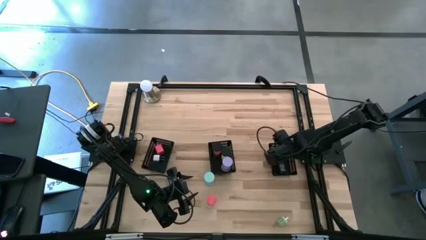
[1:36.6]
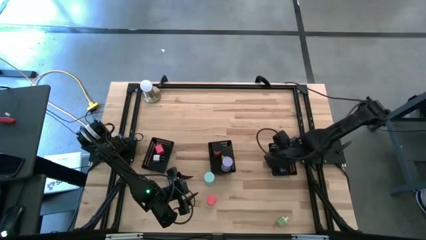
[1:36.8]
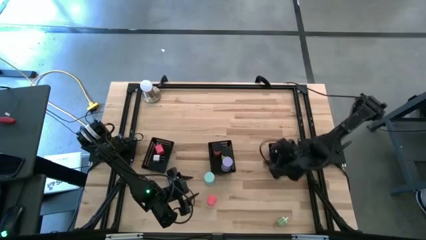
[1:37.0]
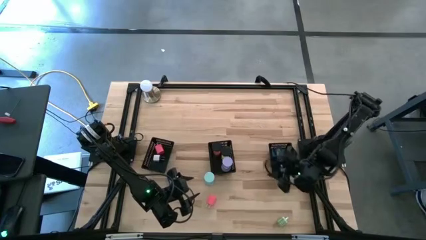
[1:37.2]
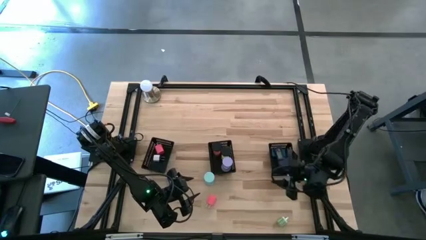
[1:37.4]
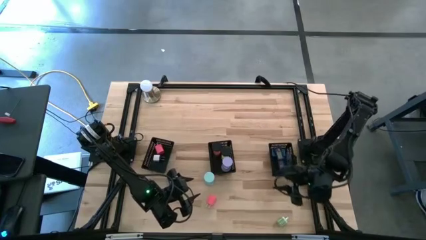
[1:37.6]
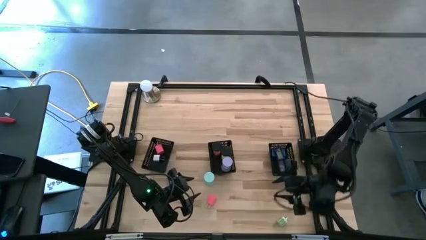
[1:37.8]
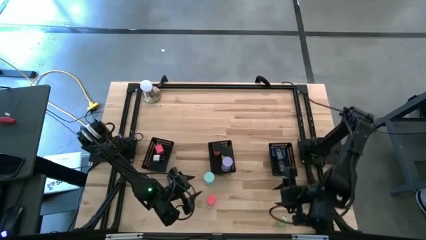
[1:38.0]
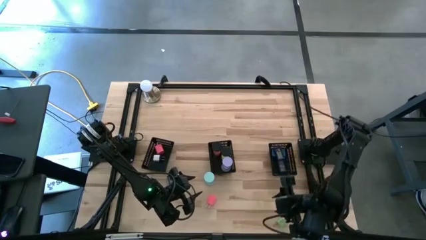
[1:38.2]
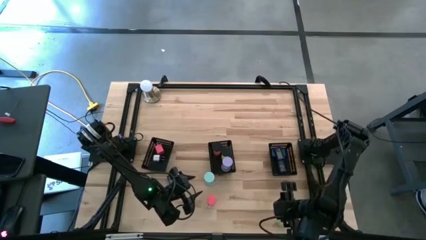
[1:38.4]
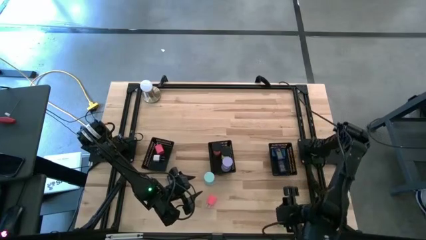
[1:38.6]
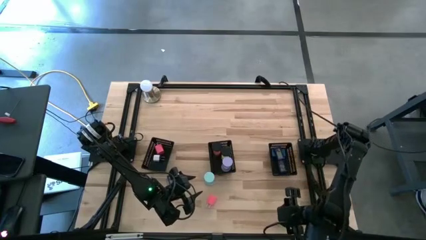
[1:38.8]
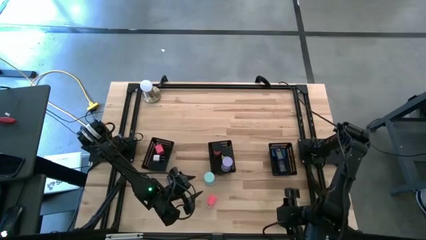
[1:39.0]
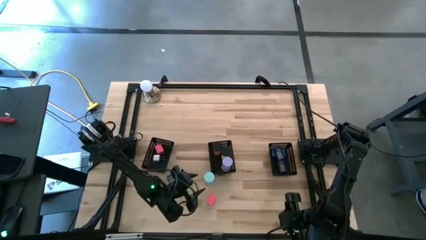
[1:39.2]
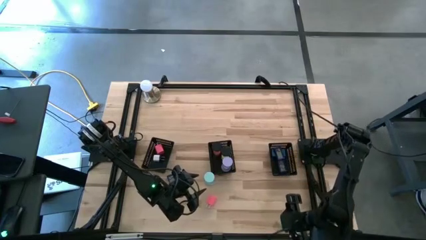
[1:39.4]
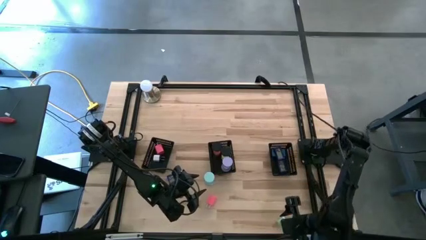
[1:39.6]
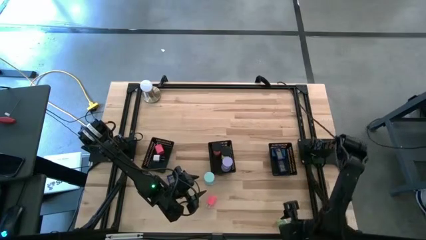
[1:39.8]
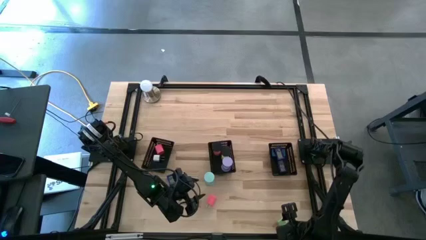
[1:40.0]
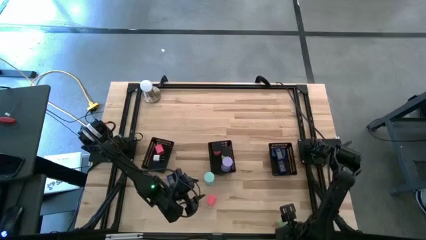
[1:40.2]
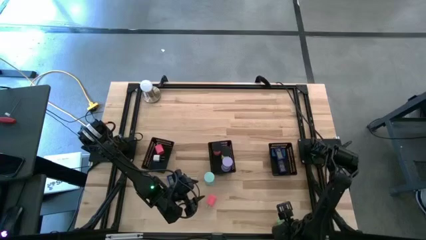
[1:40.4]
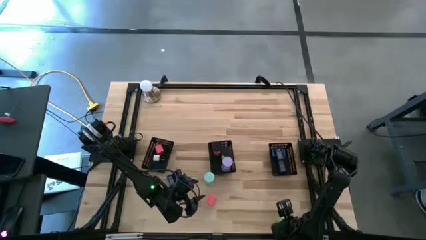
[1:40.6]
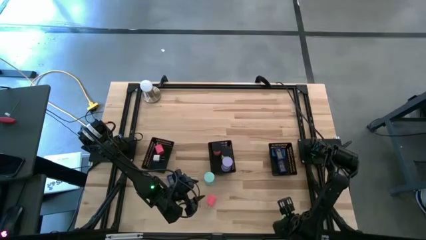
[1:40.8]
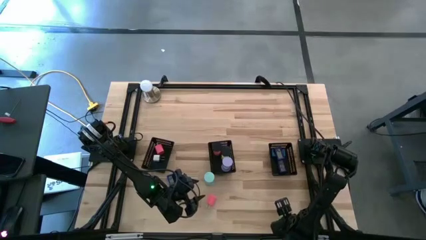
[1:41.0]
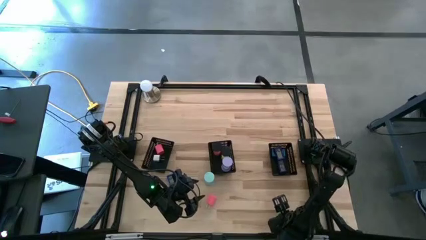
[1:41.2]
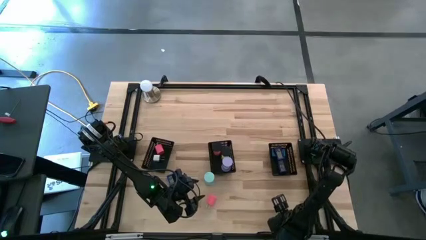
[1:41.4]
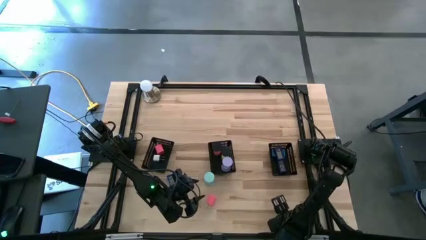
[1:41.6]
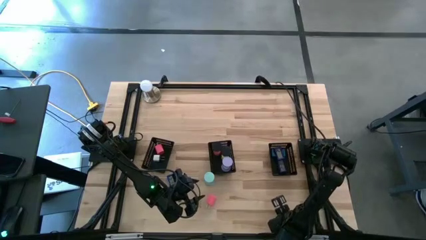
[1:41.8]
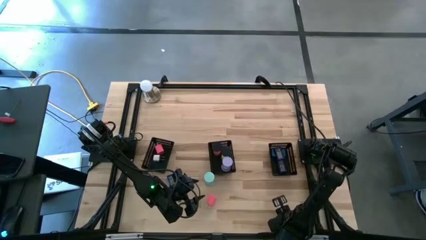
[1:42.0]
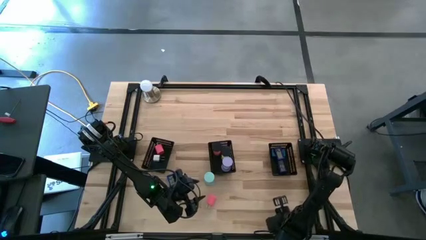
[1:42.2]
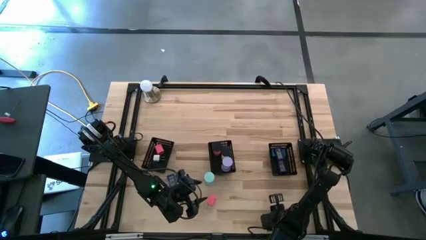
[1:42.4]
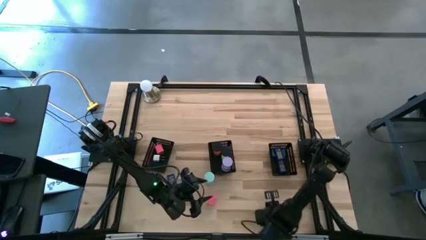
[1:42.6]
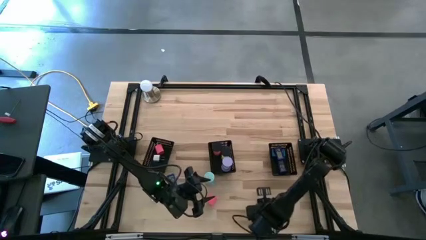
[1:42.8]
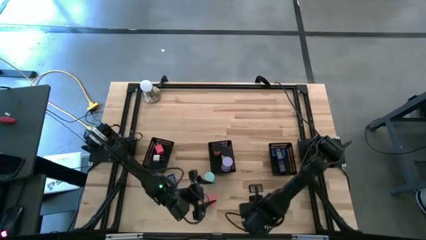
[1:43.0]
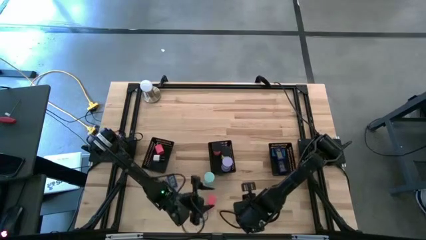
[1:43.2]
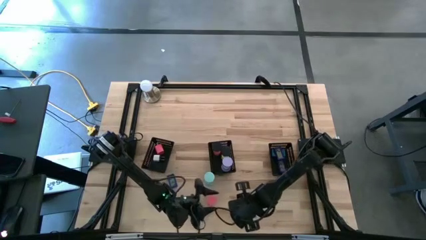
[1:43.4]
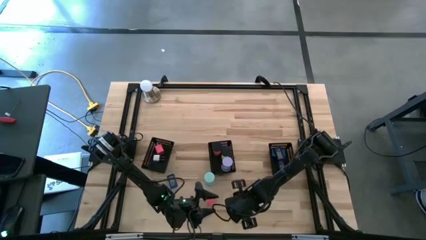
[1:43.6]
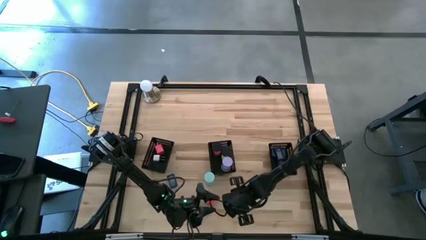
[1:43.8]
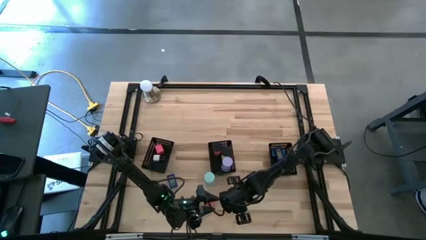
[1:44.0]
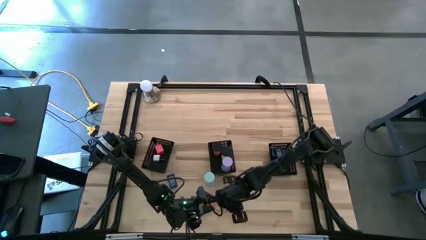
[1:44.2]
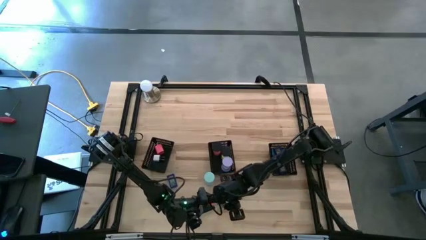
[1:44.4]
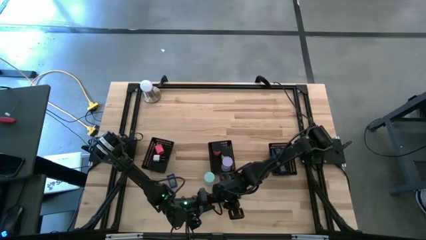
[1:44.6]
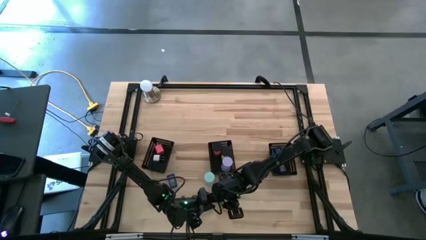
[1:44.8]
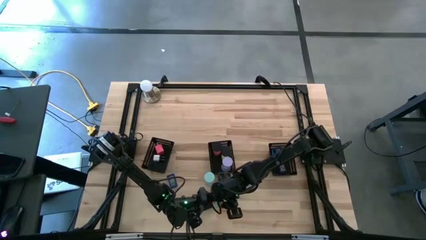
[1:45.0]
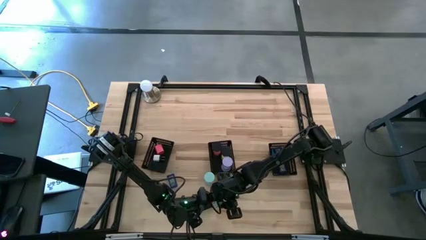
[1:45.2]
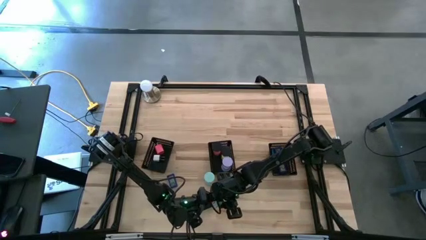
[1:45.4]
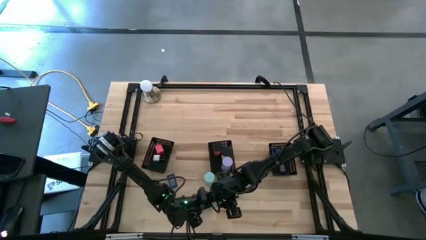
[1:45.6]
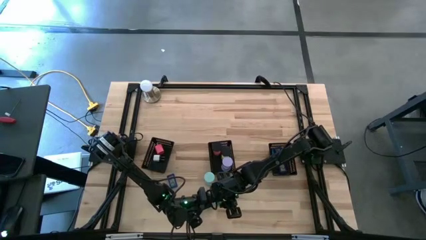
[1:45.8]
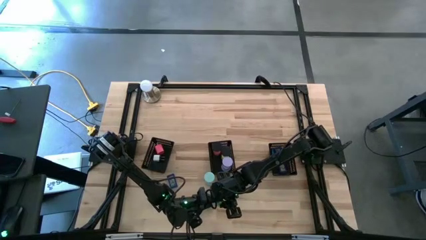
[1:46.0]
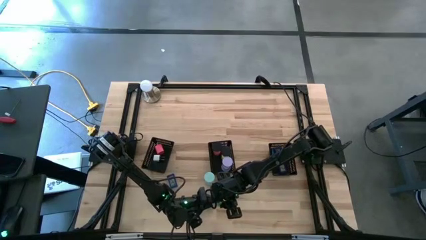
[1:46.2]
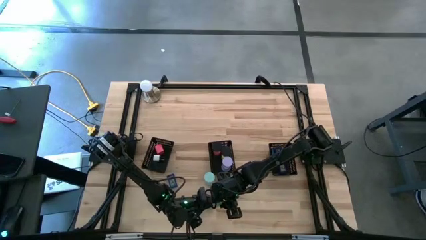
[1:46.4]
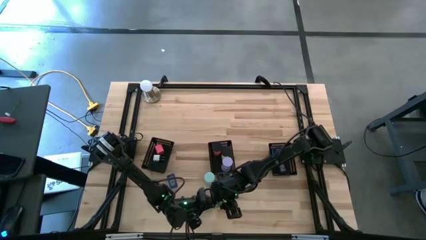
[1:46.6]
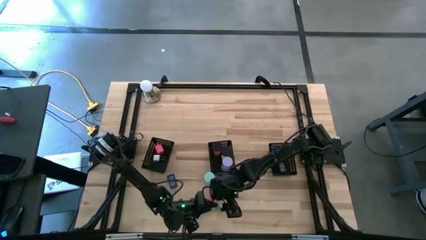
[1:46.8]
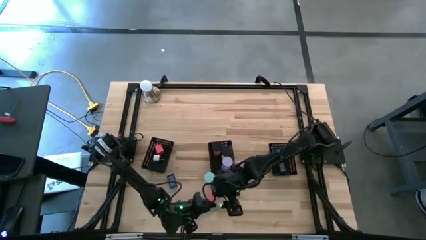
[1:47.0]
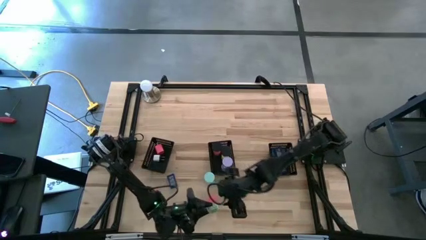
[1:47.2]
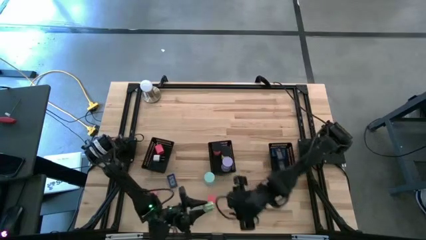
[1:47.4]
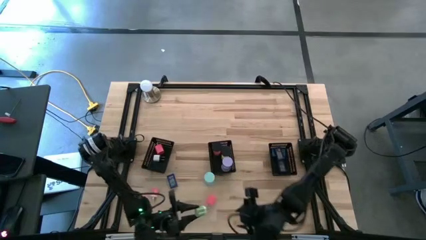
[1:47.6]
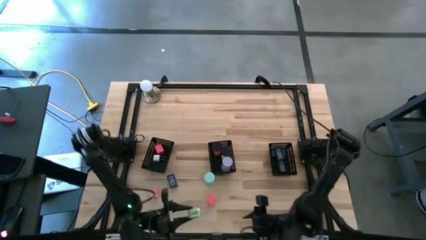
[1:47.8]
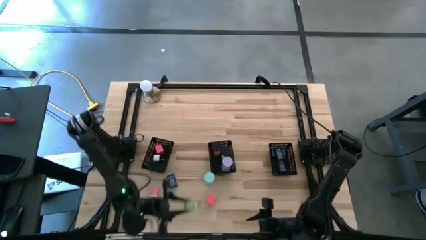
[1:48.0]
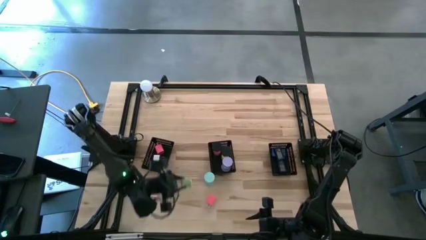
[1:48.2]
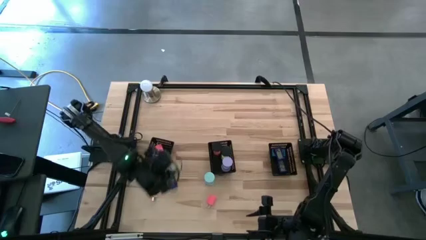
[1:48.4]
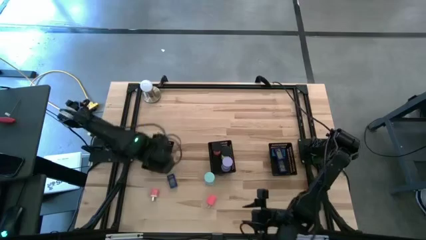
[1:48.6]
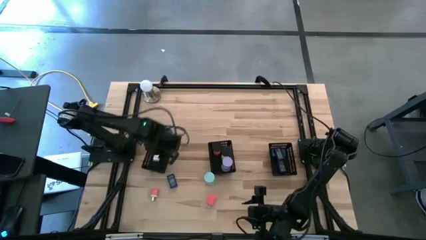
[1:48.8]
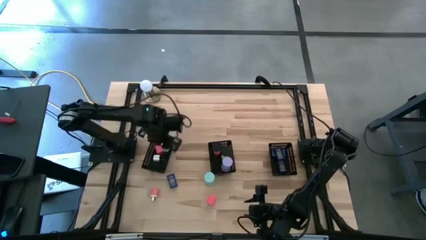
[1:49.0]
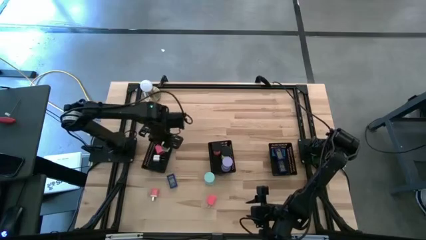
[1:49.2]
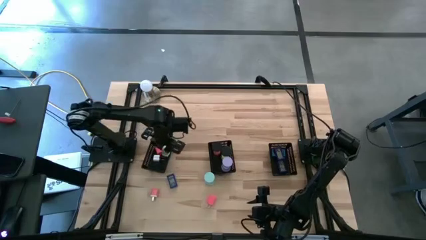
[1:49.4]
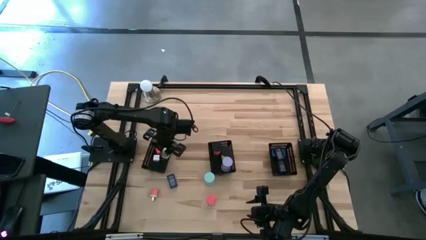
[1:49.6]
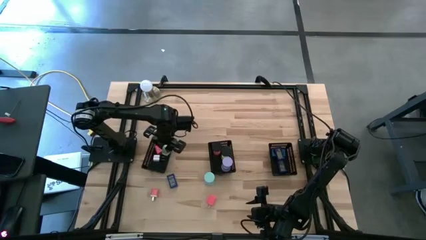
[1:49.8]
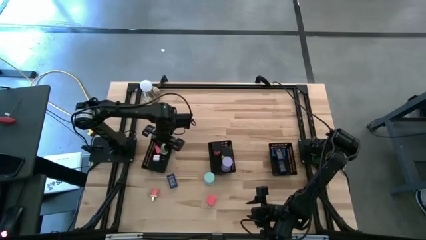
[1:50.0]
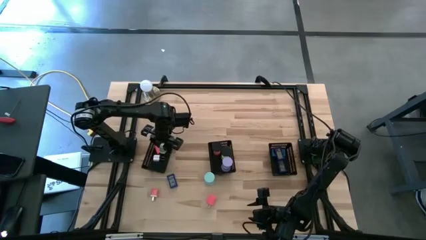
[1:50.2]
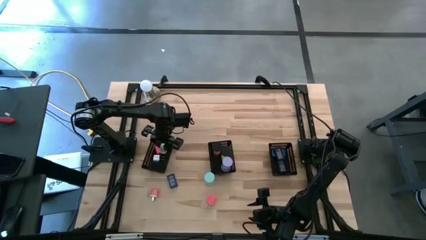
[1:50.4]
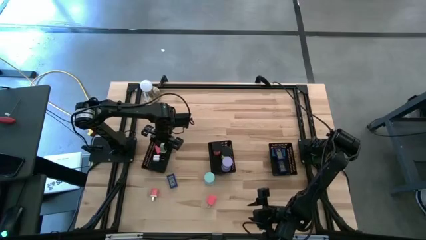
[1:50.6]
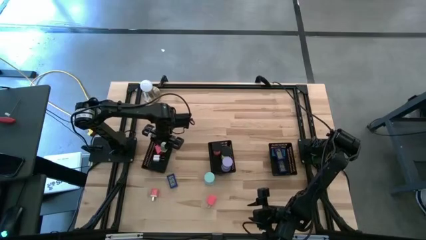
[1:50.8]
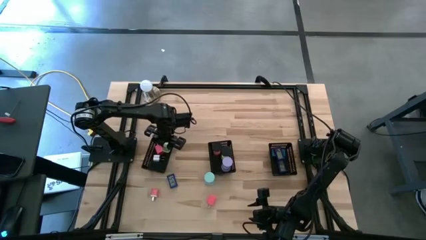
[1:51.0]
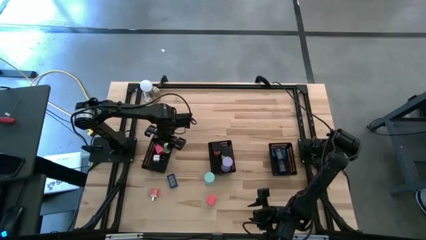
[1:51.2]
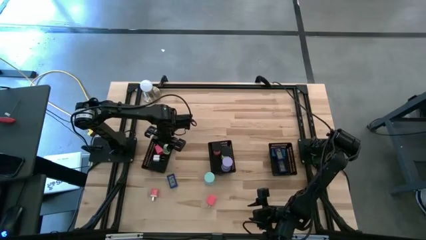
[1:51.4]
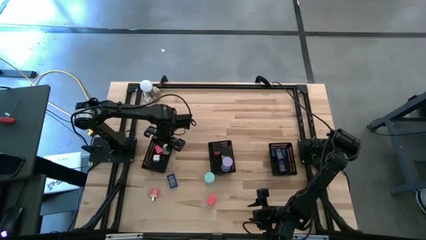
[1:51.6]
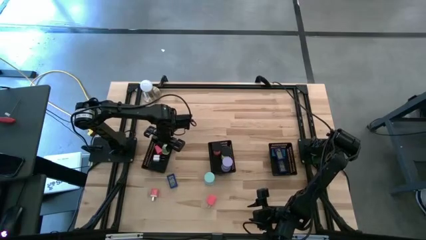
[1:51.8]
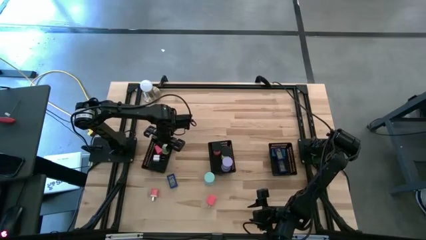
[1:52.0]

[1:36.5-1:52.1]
Task: Pick & Place Office items
Put the green charger adapter into the left black bin
